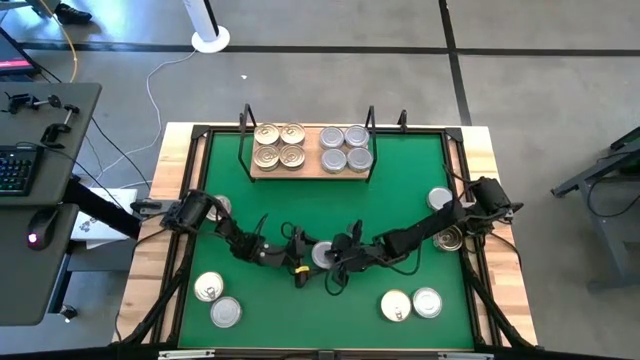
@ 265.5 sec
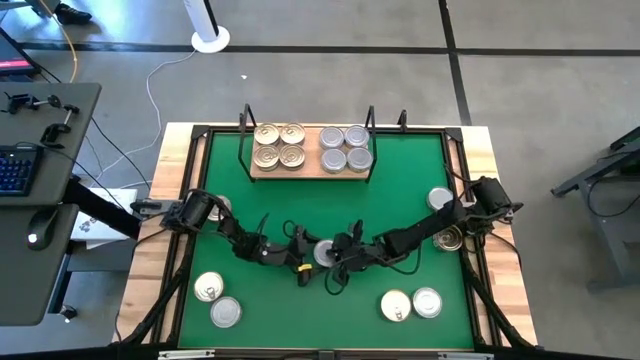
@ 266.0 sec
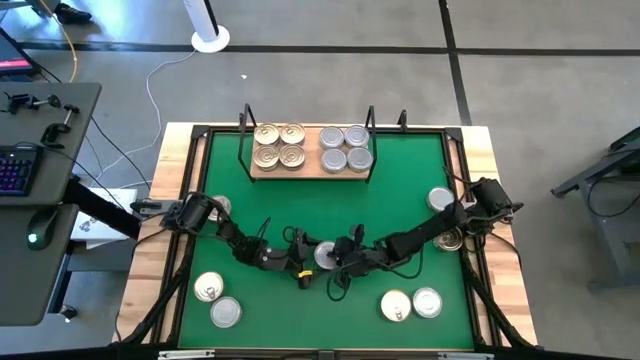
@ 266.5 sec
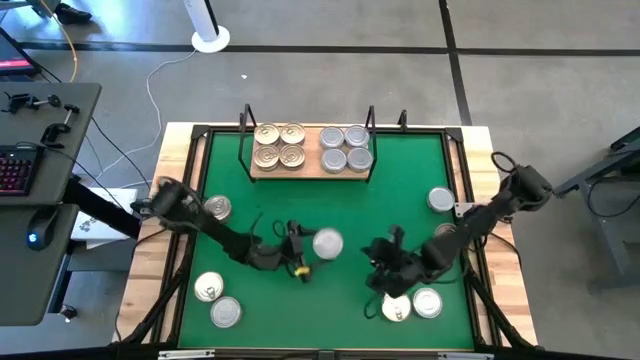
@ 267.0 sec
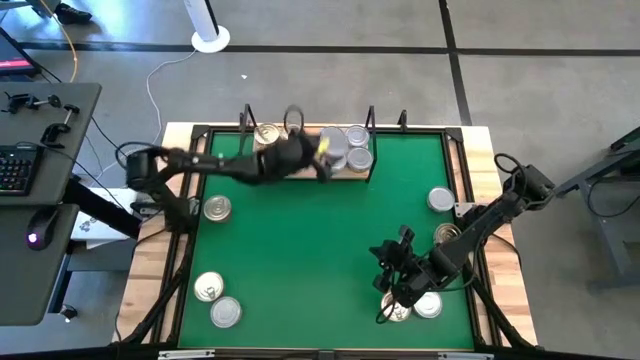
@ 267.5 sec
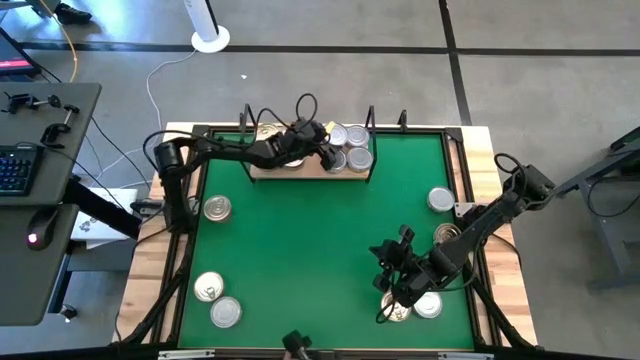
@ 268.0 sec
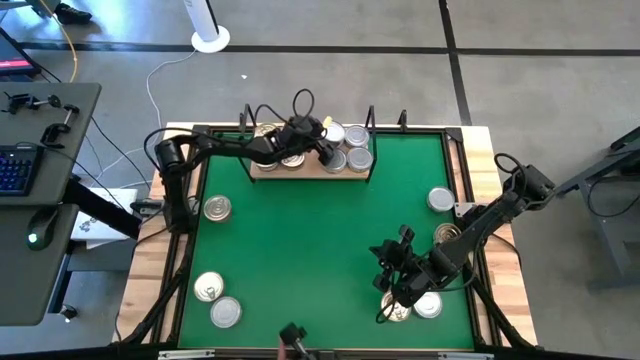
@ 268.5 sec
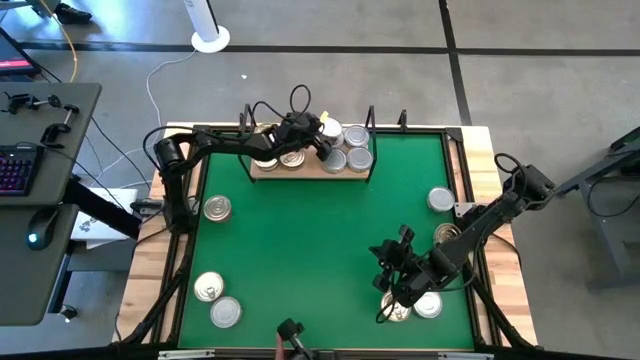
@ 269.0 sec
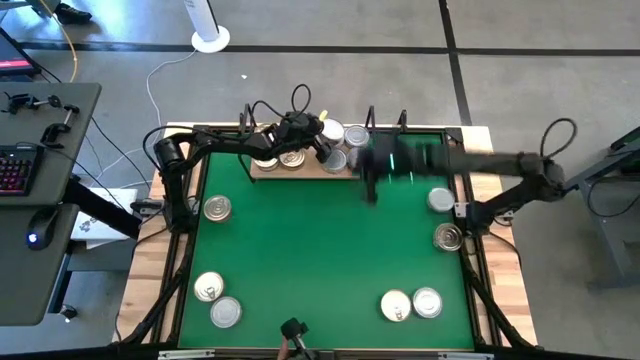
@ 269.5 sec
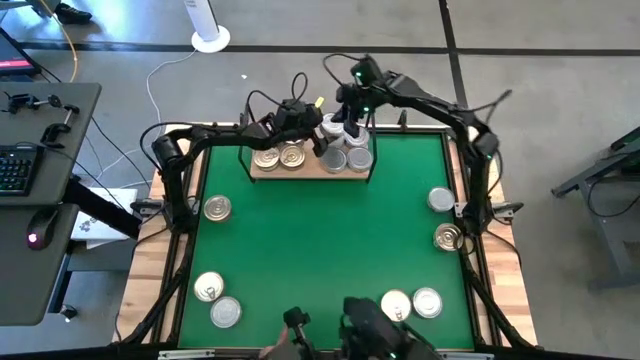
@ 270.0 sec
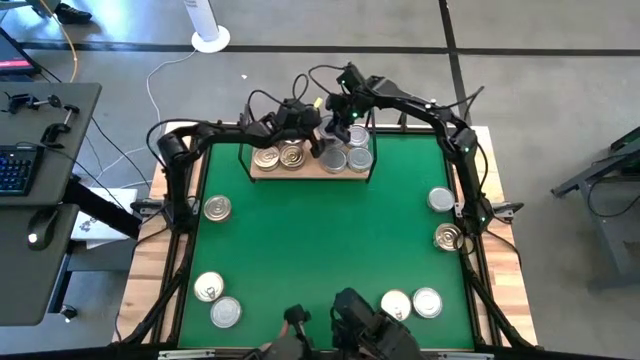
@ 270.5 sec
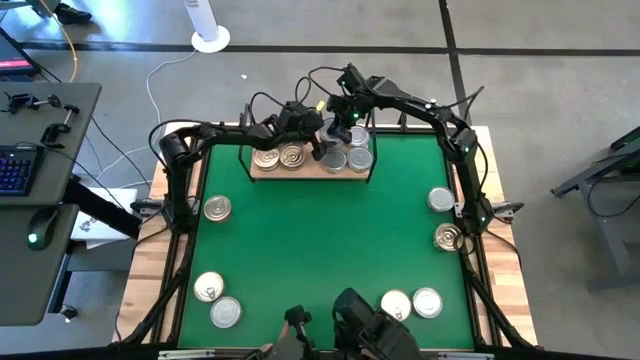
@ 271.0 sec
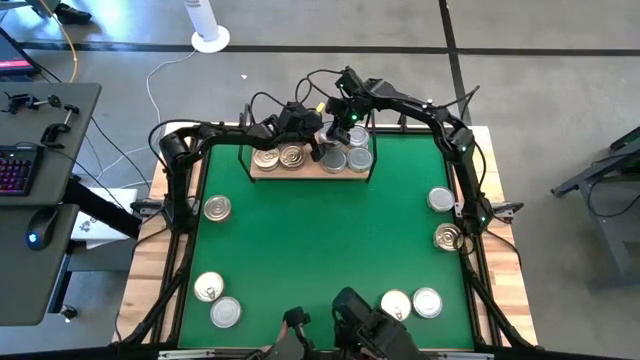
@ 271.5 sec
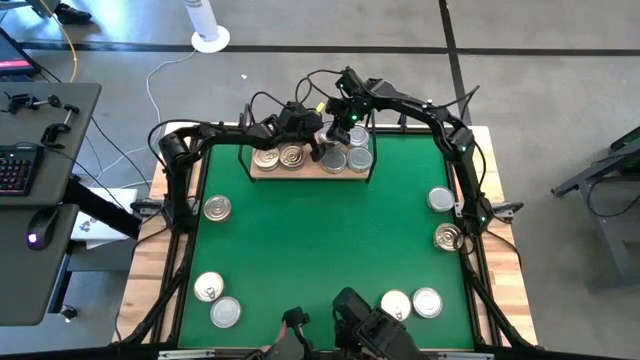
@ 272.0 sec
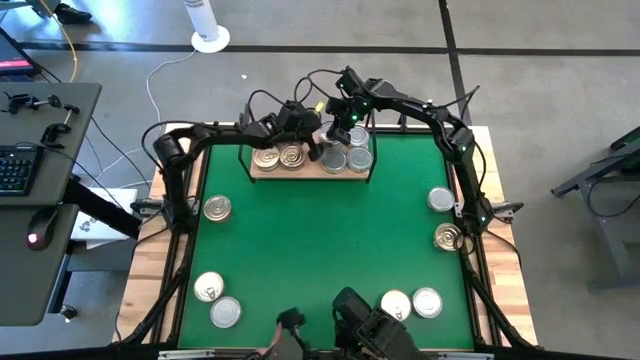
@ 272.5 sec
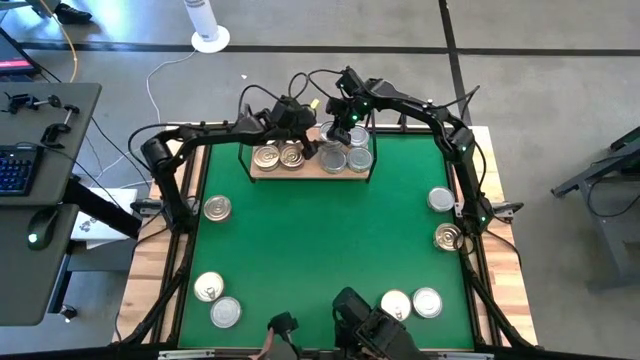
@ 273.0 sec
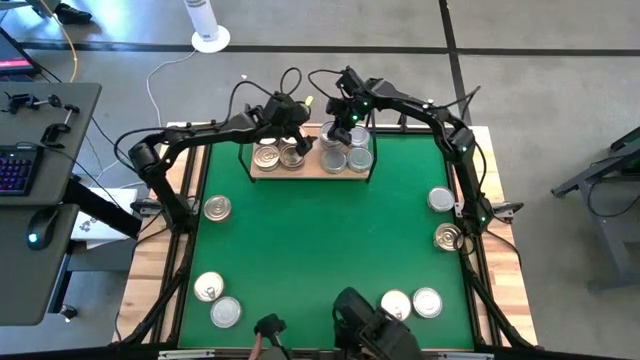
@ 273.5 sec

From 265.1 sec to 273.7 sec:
Task: Stack canned seafood by type on shelf
Stack the green tuna can on top of the other green tuna can on the shelf

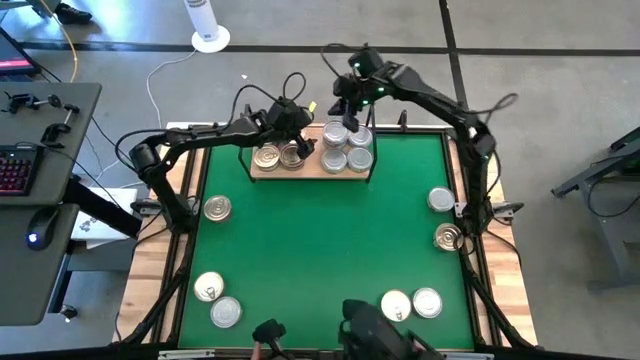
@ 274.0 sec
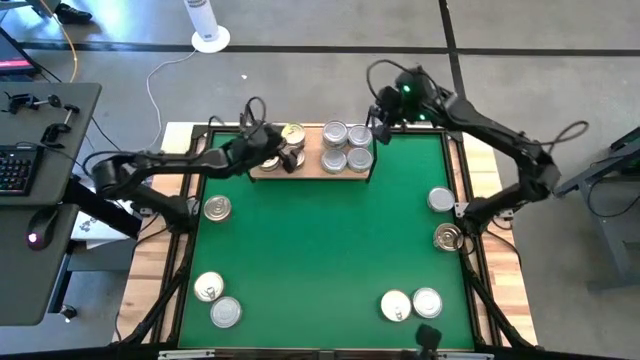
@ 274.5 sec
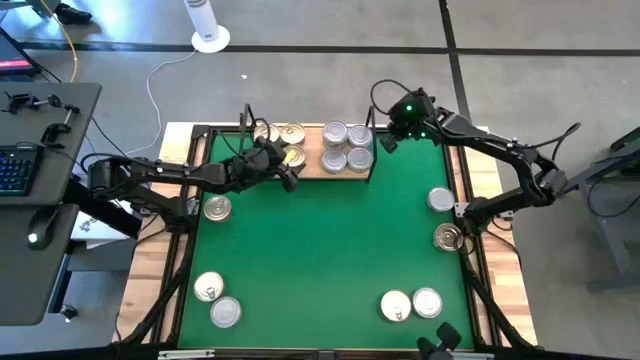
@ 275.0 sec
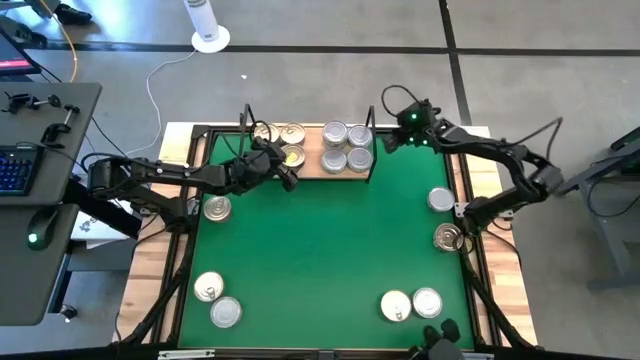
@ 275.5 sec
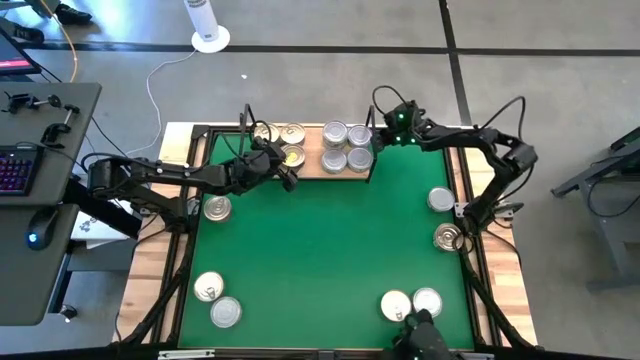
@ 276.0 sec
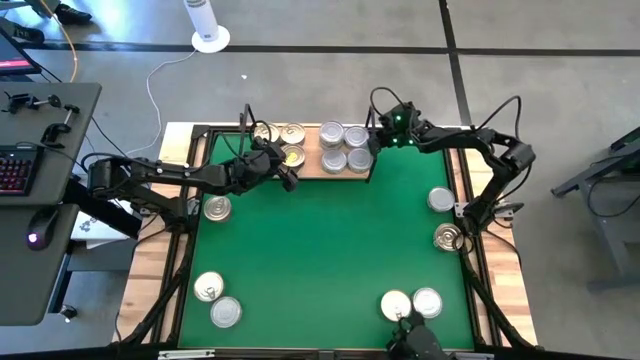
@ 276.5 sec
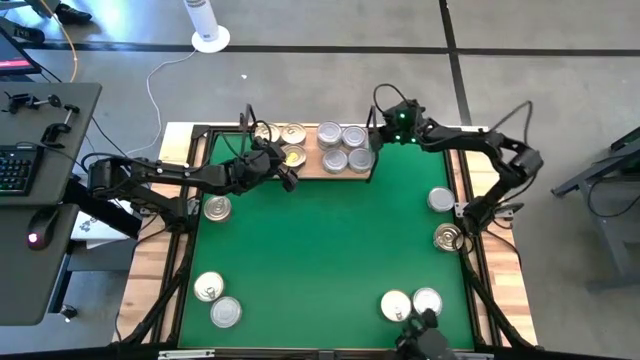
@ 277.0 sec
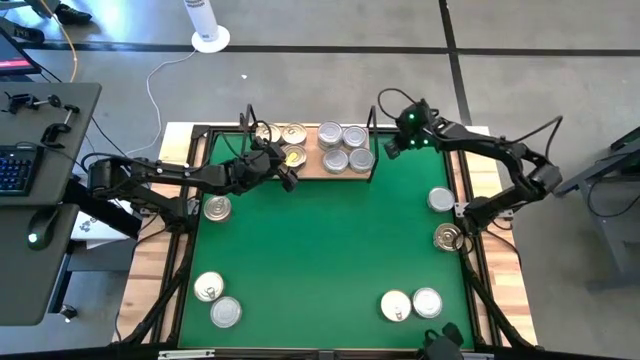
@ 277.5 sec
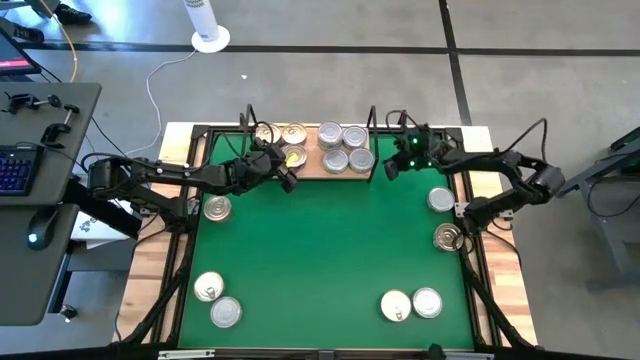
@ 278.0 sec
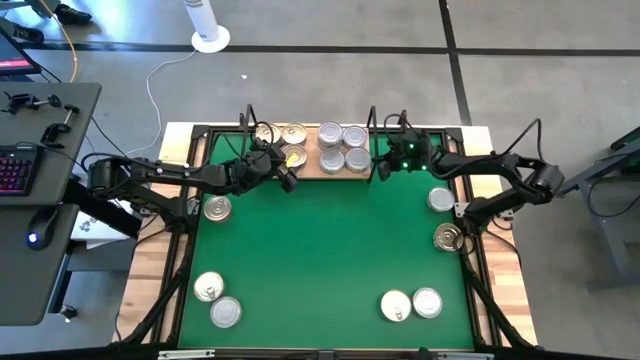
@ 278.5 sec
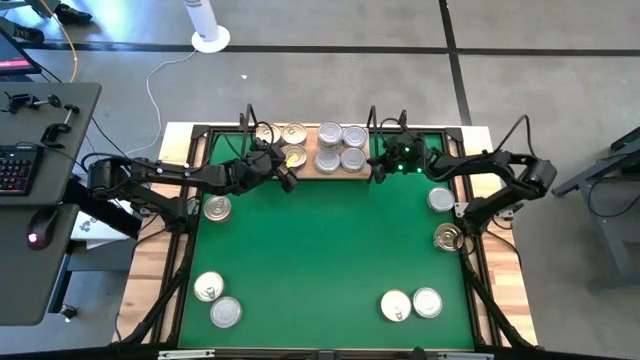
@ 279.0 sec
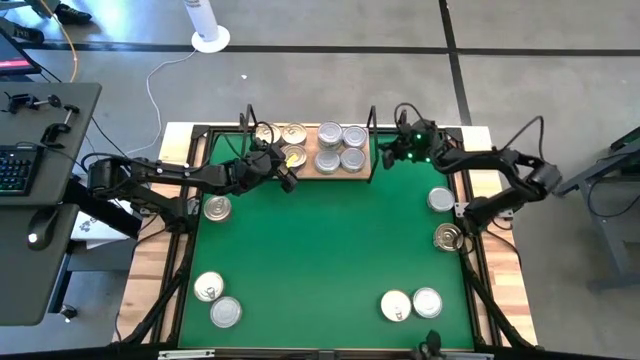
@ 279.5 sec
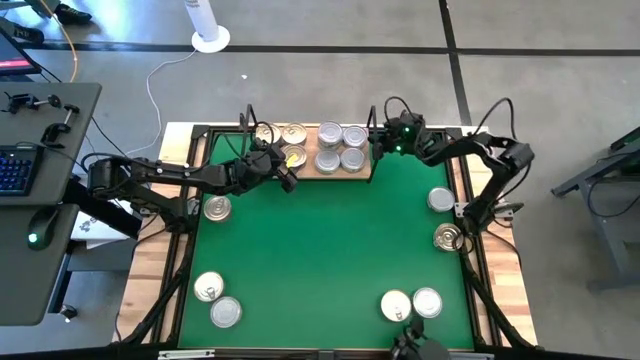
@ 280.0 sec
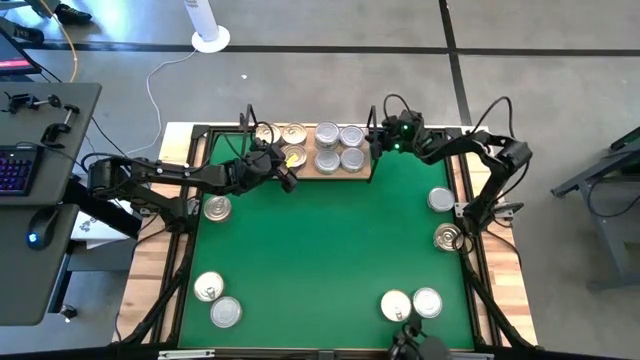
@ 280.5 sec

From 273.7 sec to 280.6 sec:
Adjust the tuna cans on the shelf

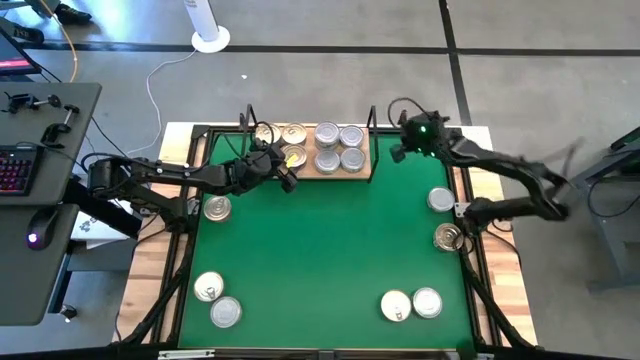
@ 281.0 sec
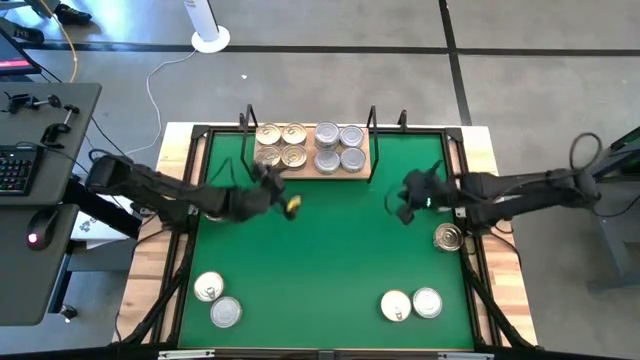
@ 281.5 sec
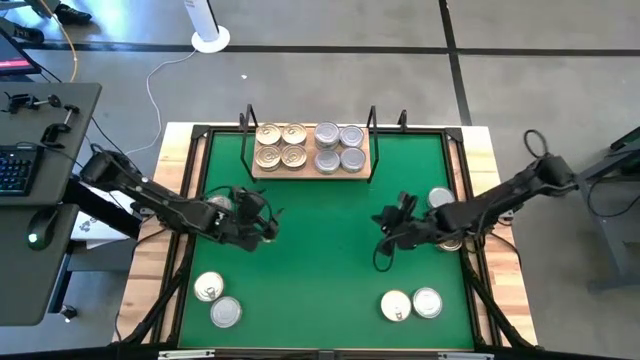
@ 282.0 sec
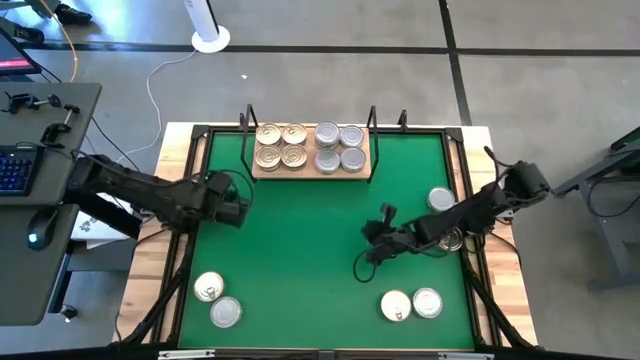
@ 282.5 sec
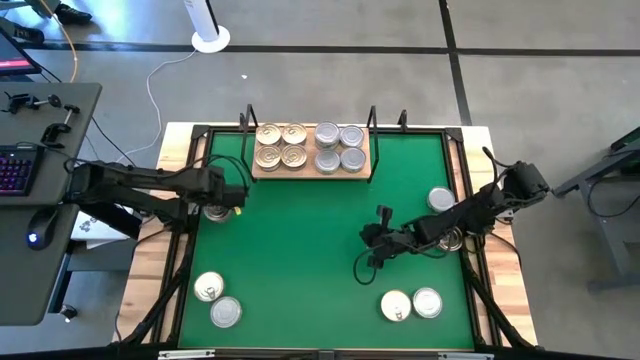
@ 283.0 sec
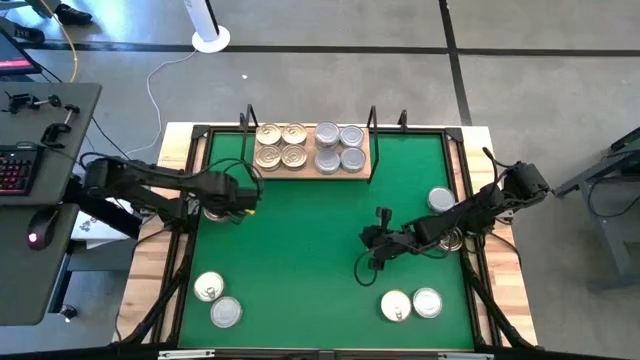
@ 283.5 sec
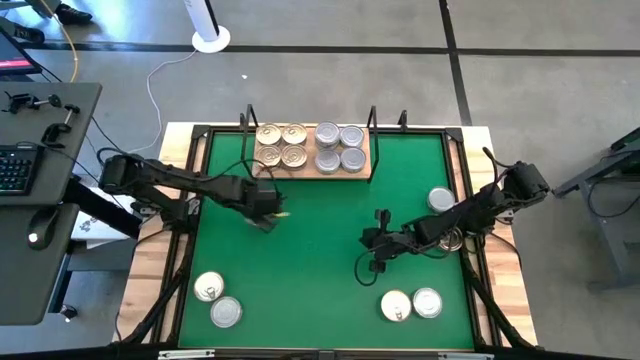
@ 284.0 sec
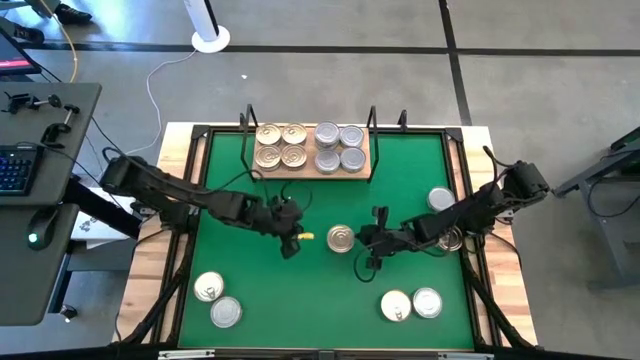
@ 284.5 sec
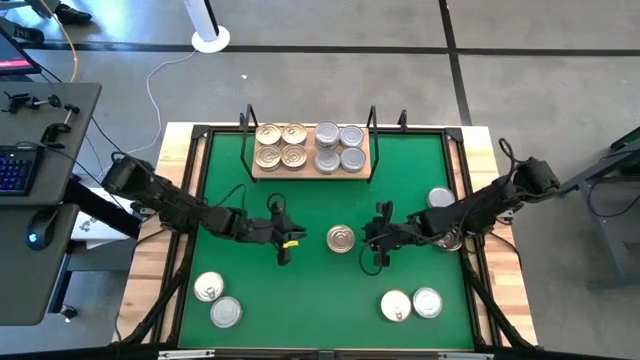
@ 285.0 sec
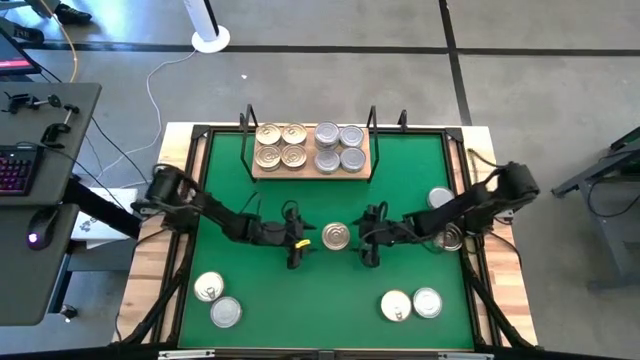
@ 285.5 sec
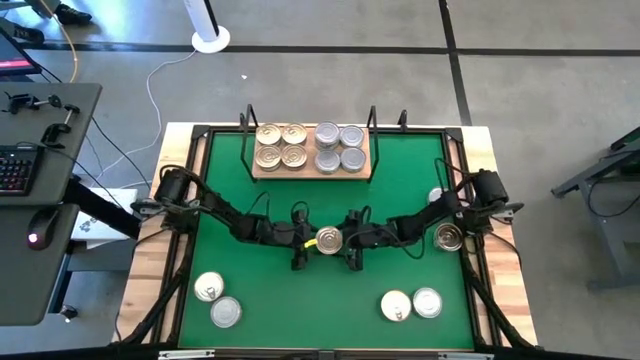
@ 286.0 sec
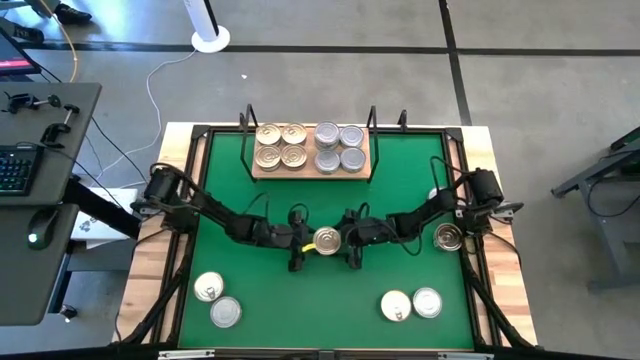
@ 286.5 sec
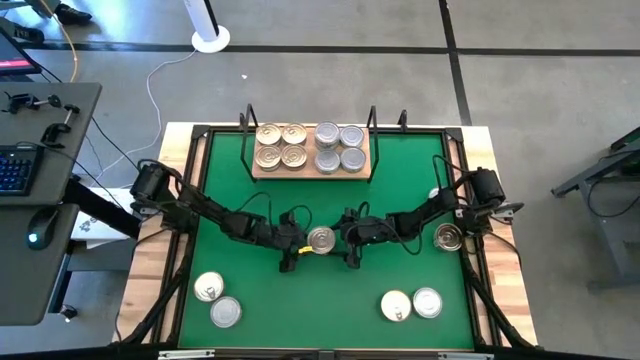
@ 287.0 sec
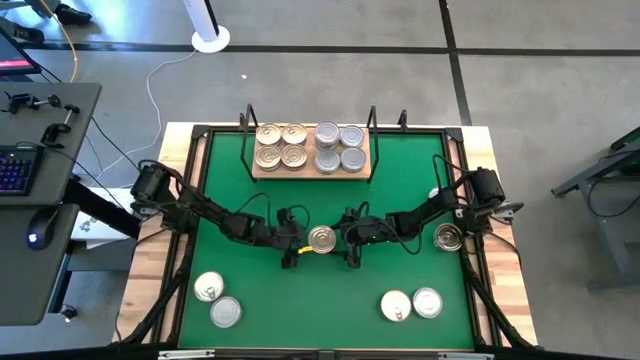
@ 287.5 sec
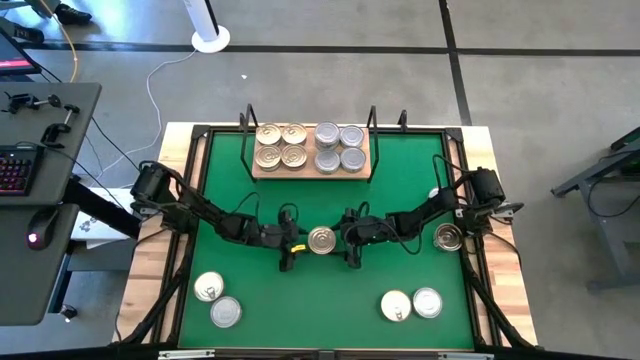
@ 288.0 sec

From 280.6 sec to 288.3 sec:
Stack the blue/pink tuna can on top of the other blue/pink tuna can on the shelf
